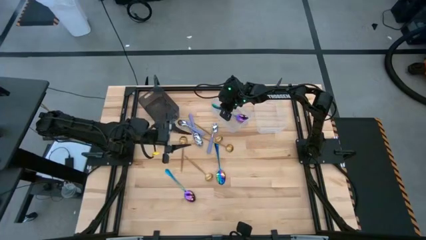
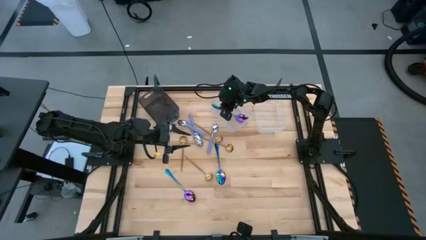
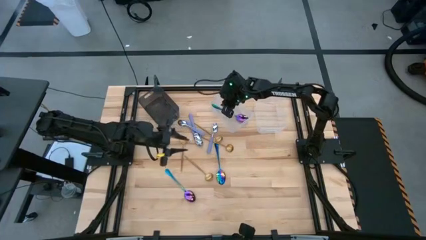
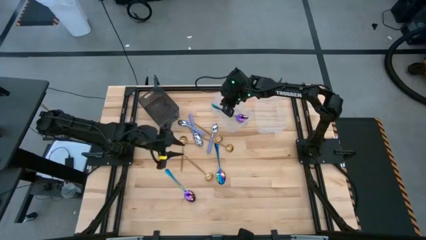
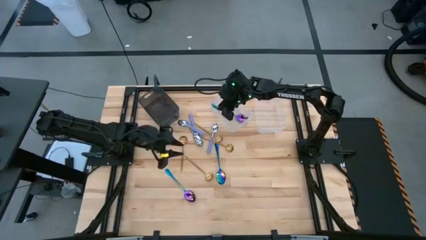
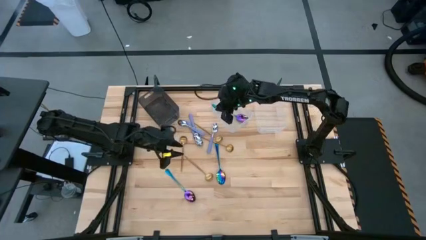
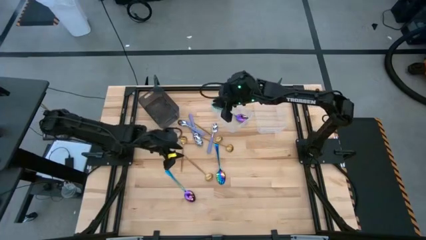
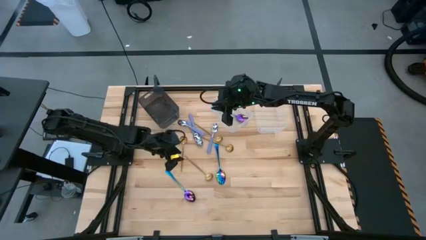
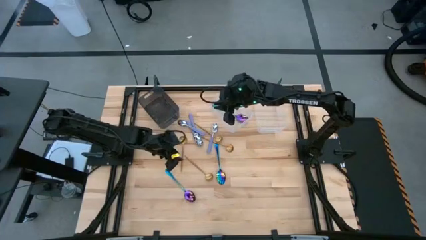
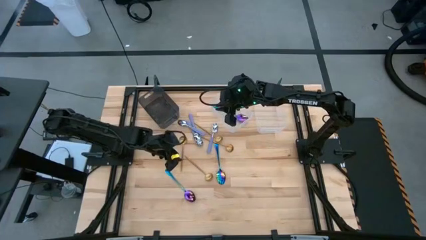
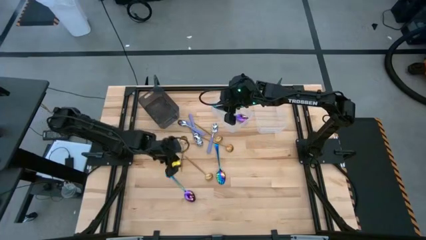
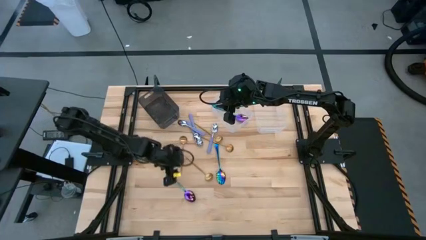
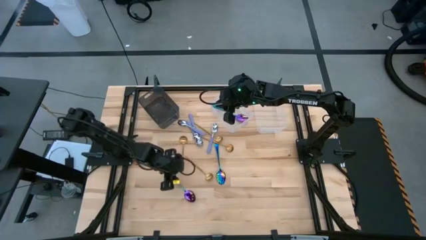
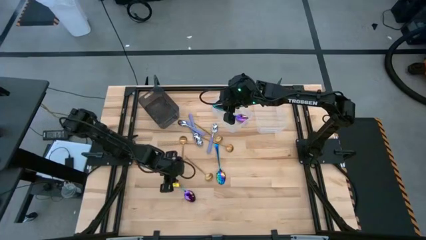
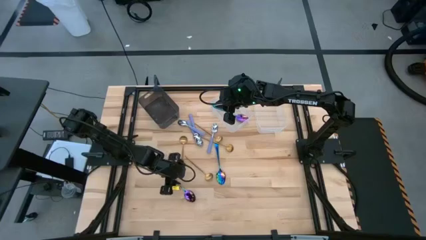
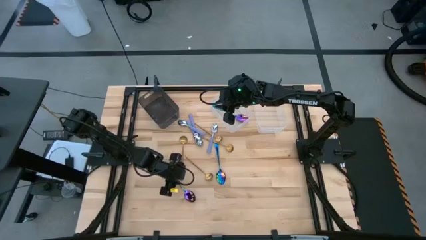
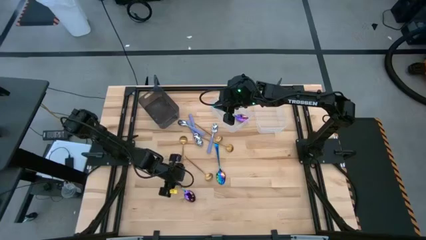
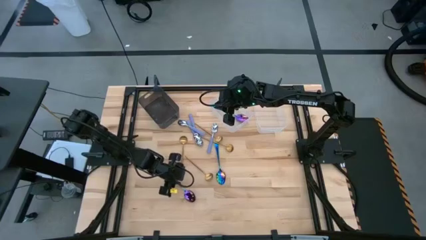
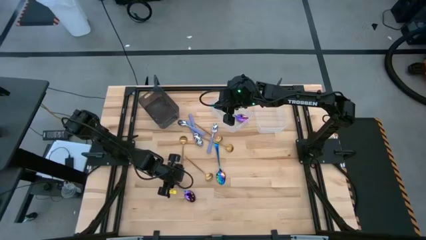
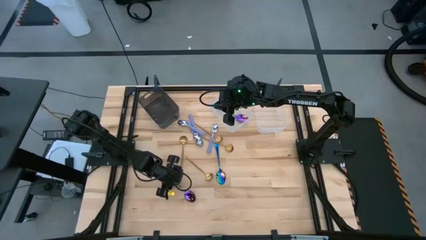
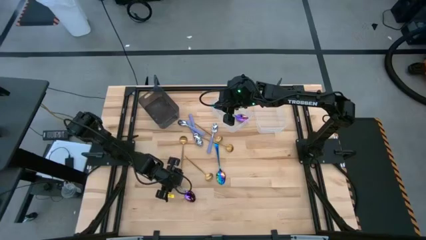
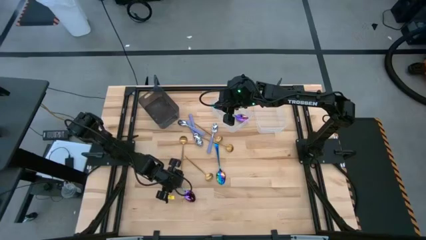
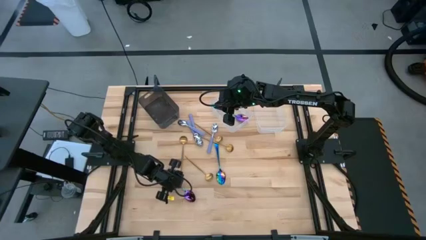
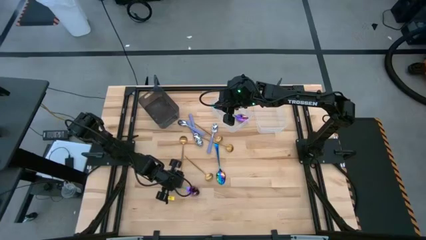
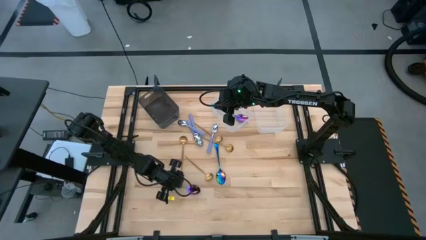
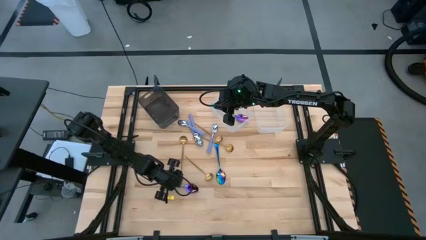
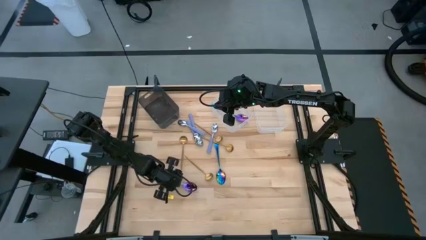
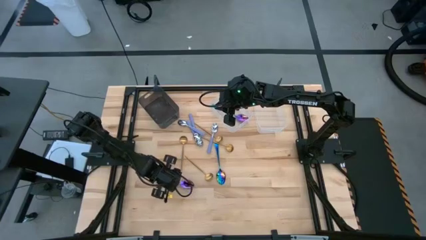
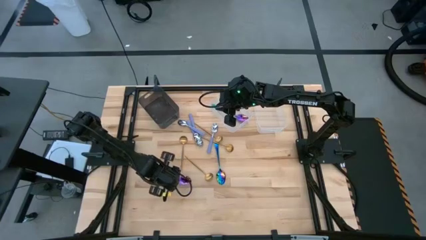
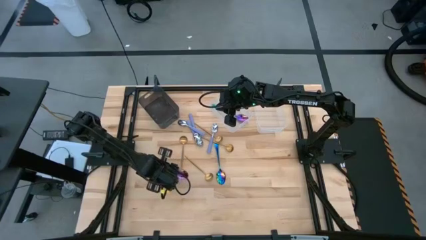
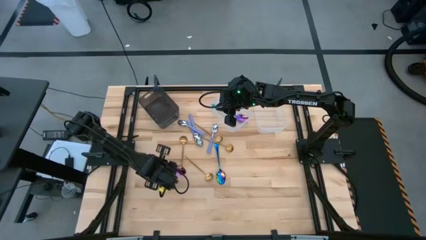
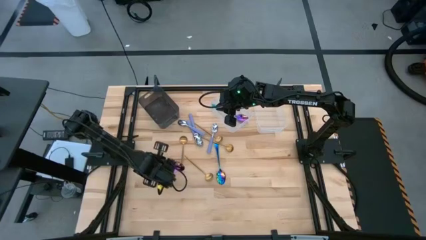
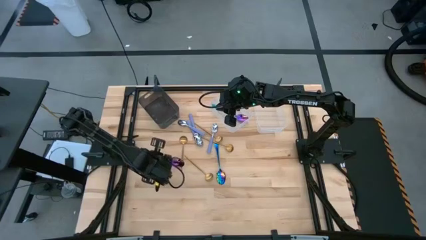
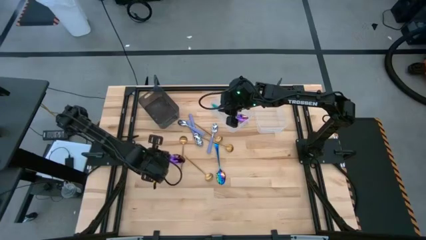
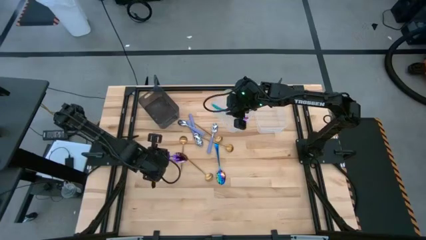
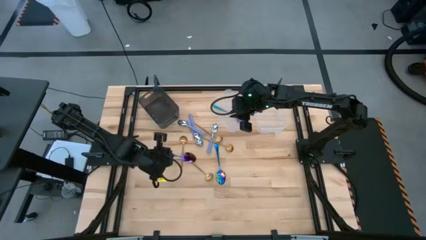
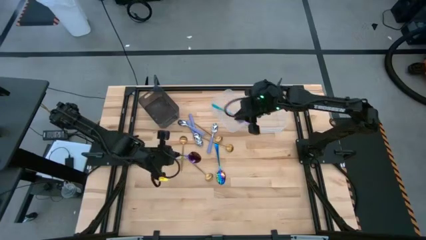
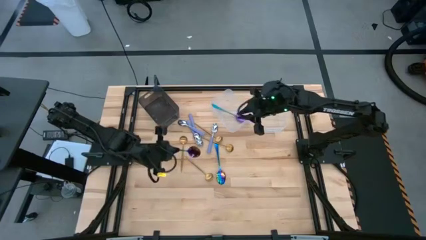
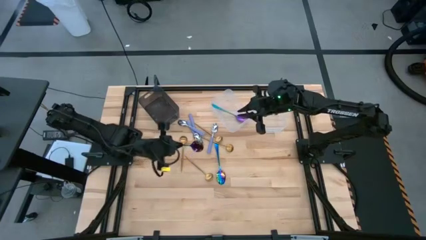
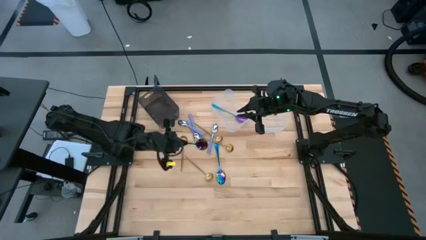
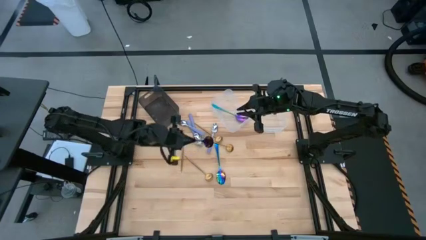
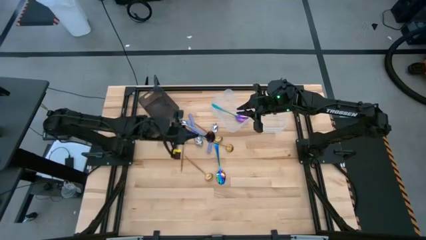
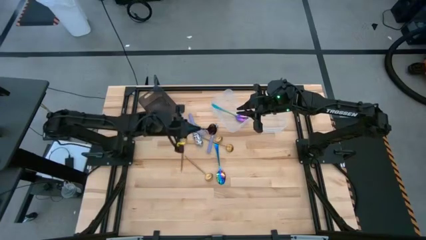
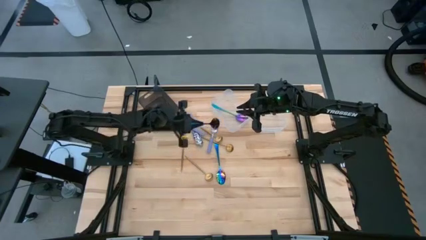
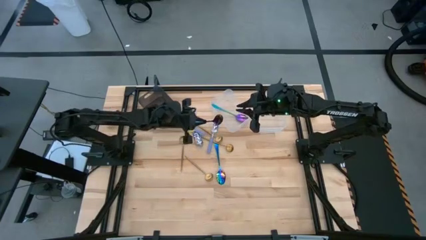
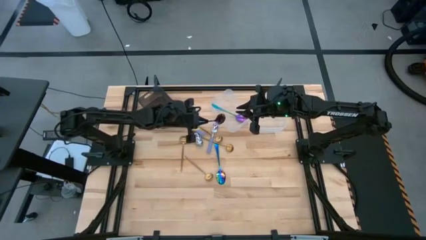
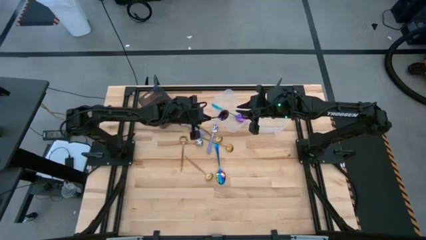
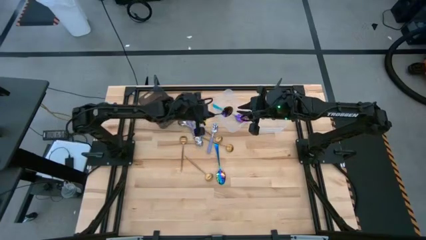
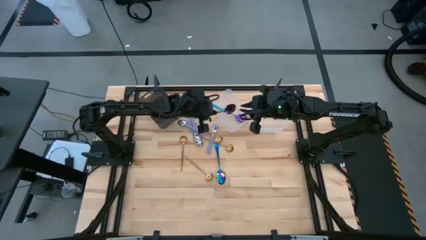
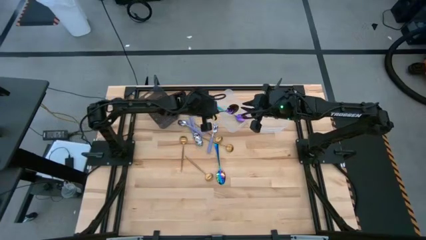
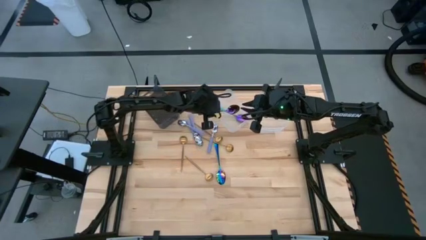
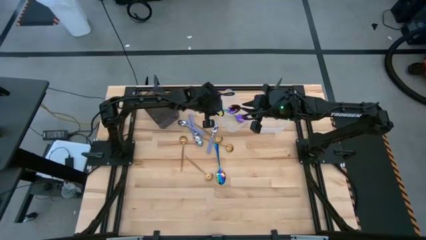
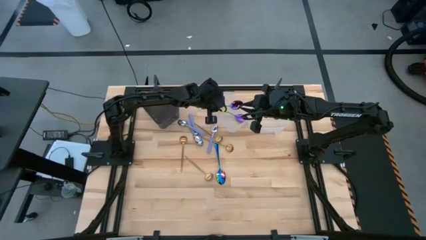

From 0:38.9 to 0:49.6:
Task: Sort silverware by color (type)
Put the blue spoon into the left transparent bin
